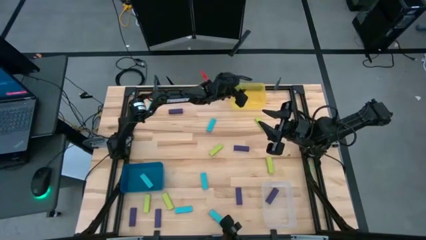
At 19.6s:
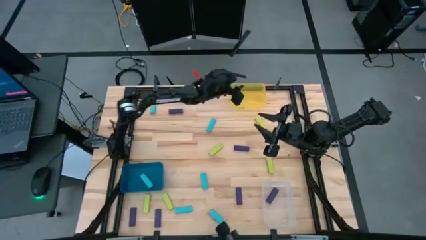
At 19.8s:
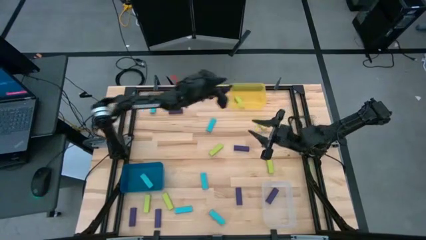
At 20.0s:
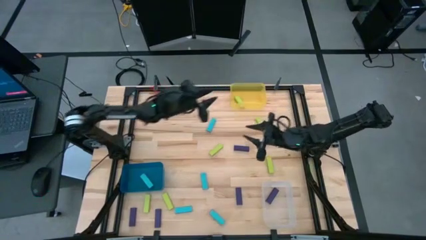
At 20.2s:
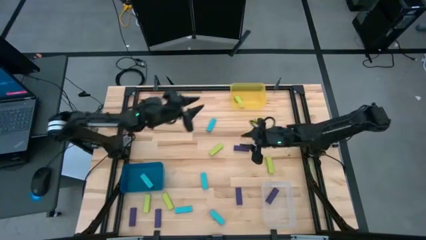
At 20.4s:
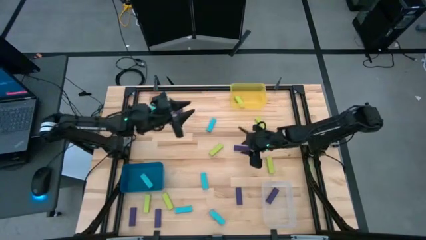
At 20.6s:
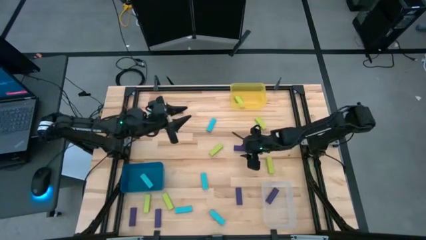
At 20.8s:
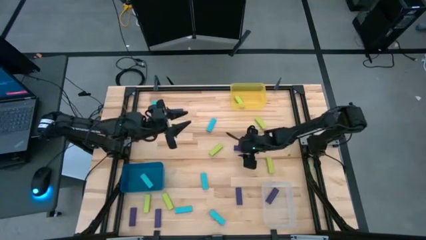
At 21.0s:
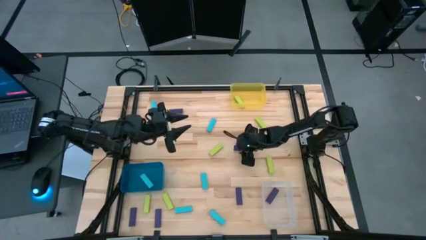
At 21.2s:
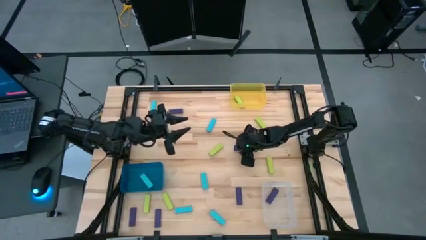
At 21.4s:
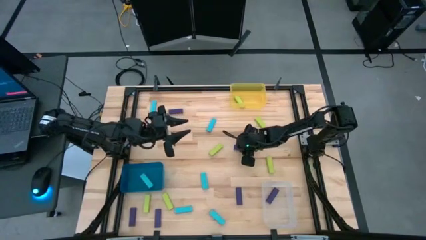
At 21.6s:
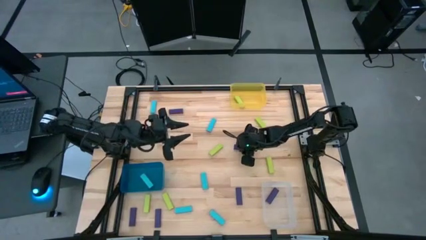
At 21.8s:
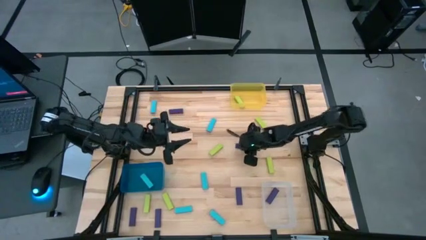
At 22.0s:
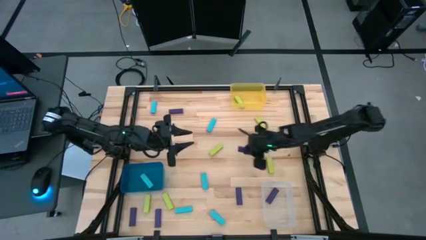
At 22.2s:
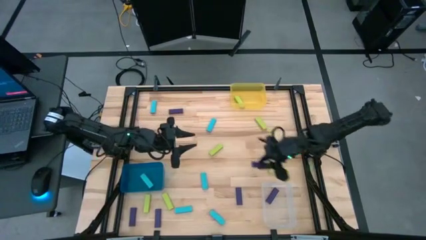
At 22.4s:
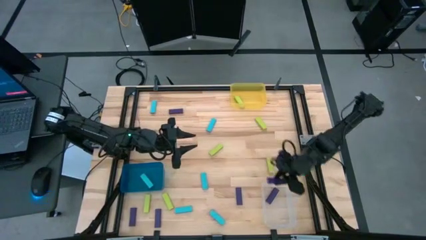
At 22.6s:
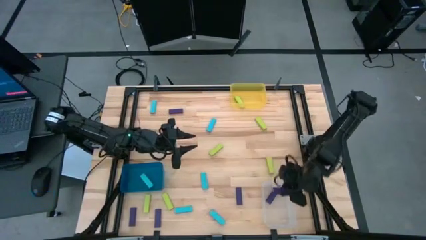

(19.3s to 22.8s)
Task: Sort blocks
Put the purple block into the transparent bin

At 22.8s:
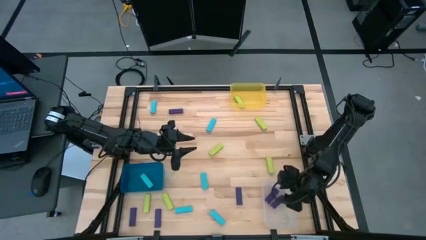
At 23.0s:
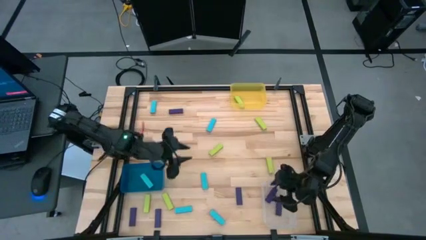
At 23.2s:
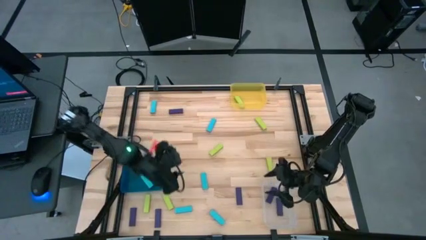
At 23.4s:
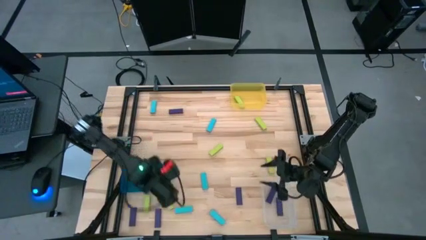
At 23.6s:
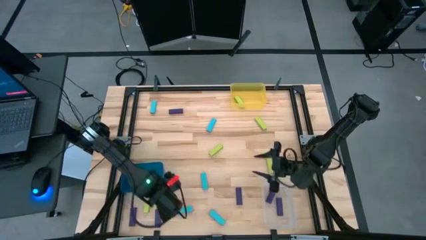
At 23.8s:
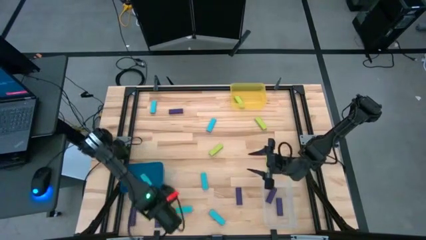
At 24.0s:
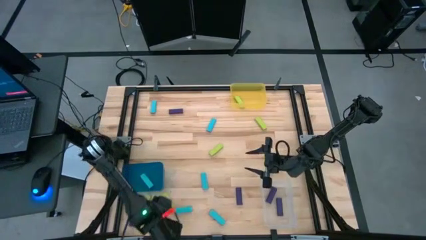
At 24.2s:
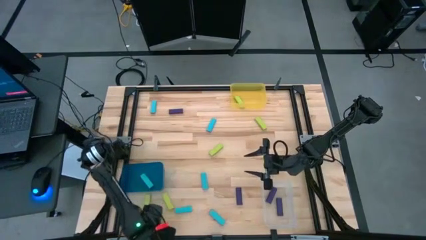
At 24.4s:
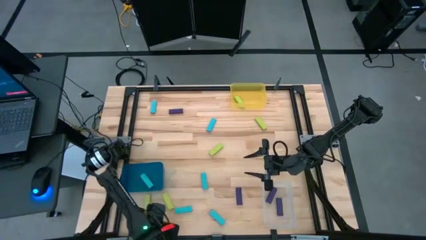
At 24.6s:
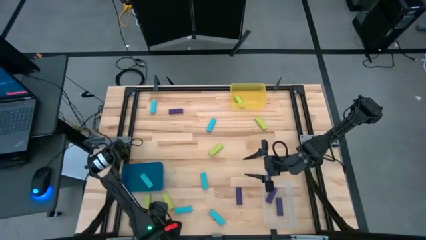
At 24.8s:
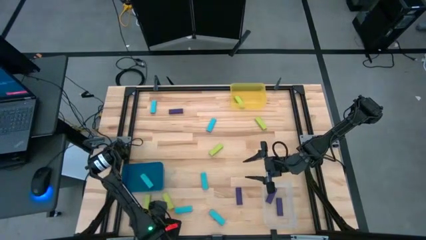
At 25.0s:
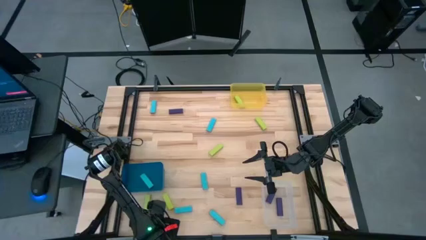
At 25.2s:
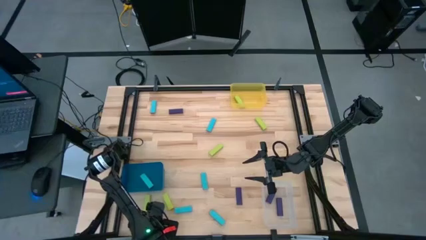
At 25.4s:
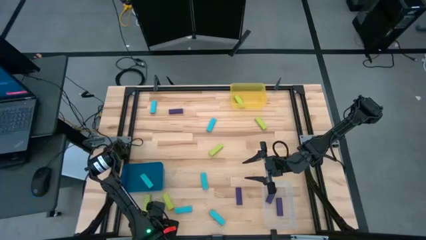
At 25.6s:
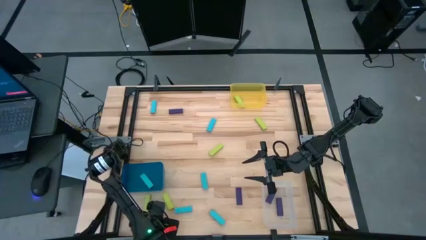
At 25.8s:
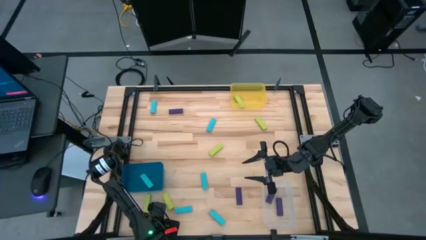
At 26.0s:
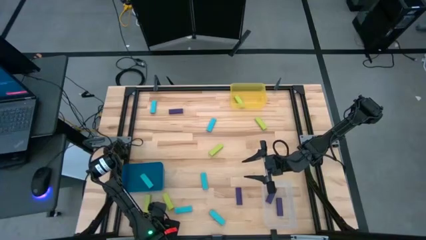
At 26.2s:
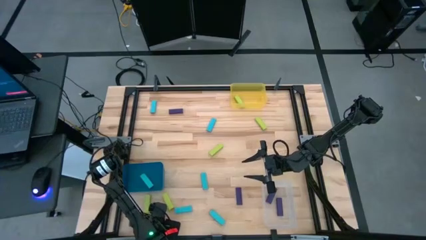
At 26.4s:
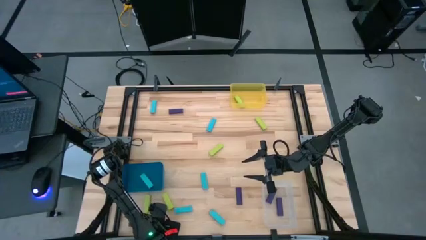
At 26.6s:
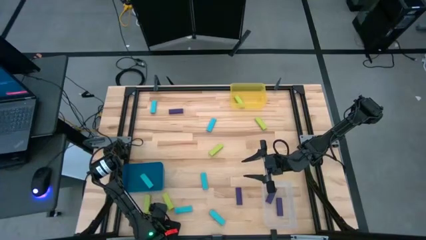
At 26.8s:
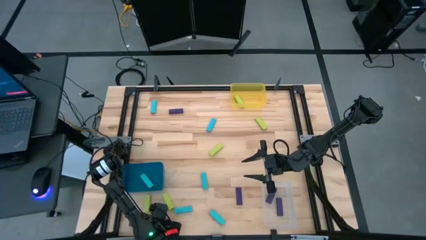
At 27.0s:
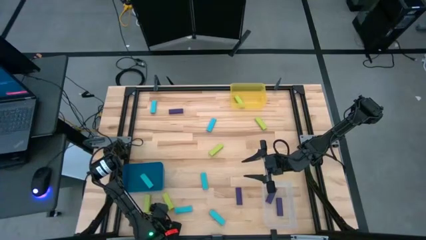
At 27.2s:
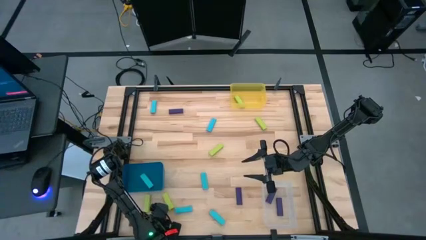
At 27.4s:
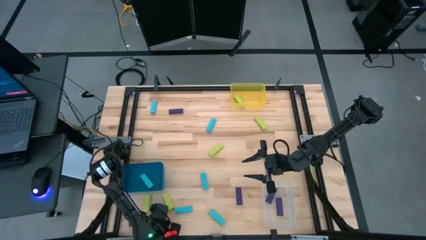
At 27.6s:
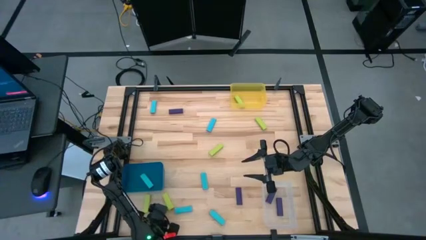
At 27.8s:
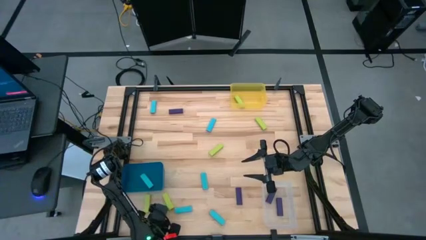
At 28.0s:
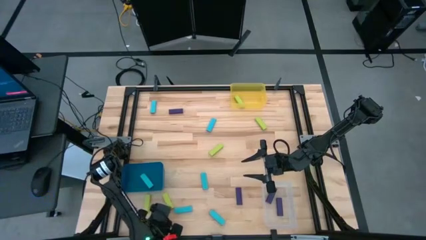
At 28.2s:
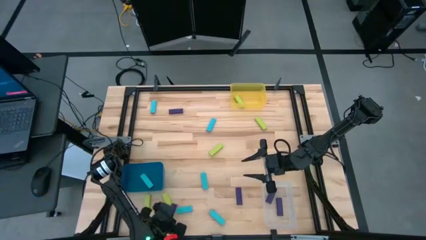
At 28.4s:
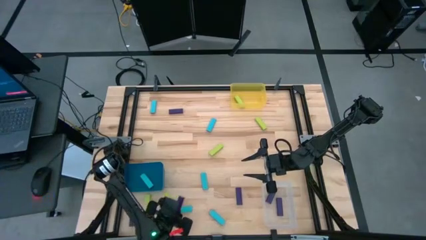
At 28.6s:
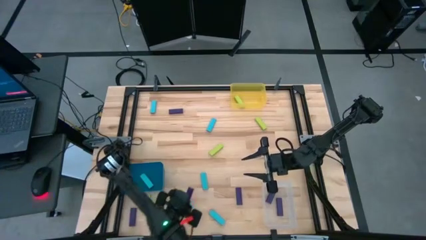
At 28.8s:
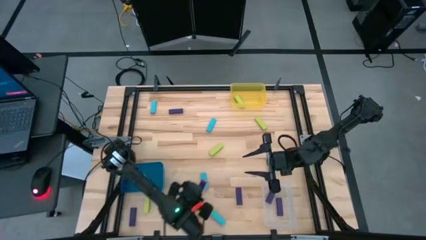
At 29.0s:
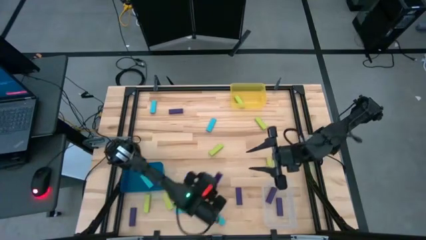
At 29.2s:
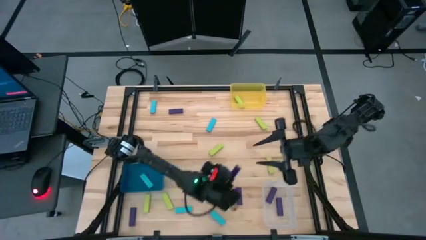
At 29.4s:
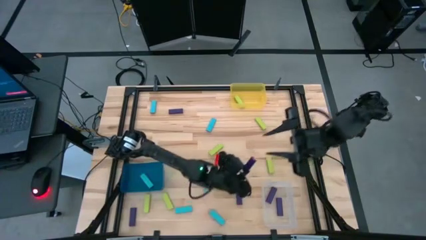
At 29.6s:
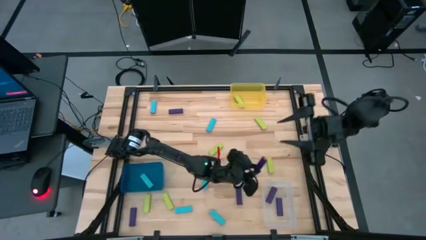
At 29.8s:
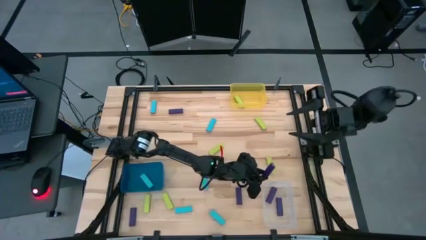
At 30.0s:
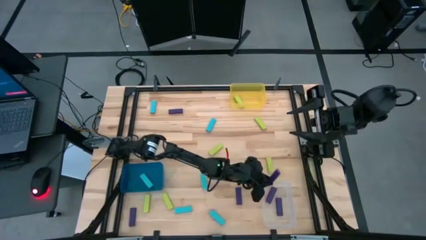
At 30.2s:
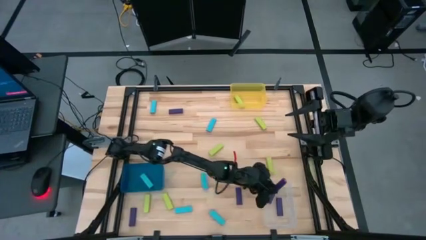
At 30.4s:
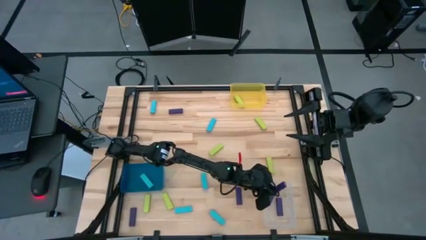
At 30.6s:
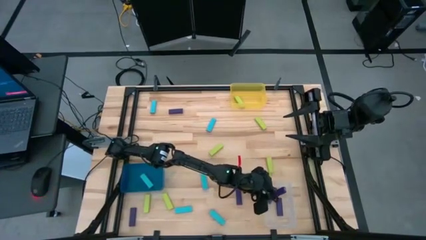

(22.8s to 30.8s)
Put the purple block into the transparent bin

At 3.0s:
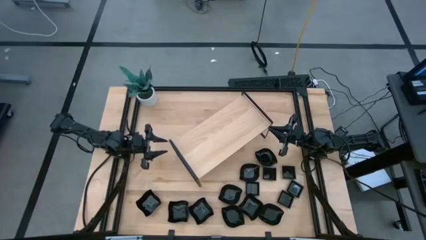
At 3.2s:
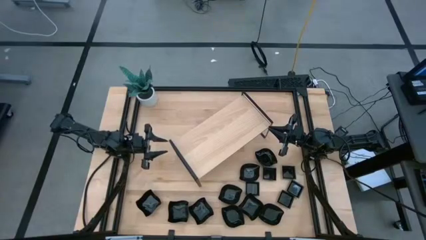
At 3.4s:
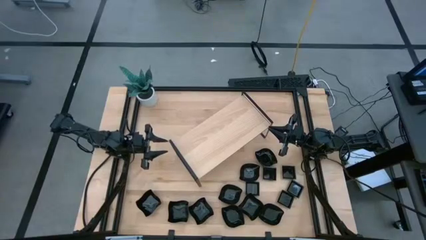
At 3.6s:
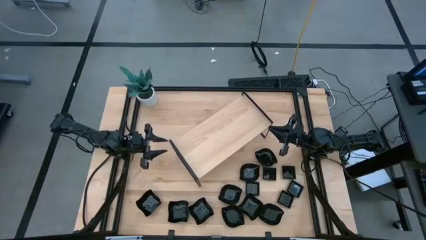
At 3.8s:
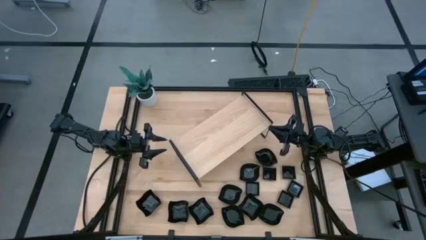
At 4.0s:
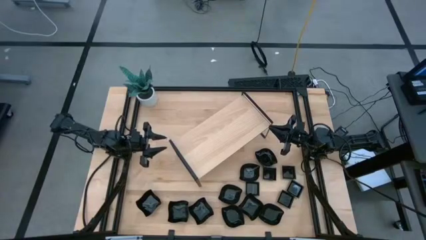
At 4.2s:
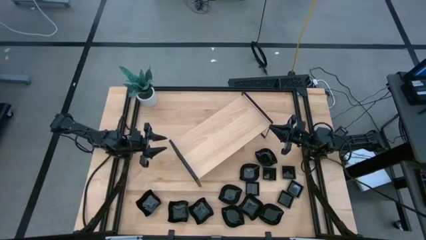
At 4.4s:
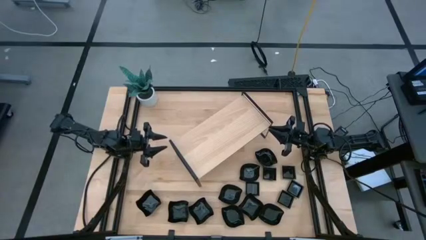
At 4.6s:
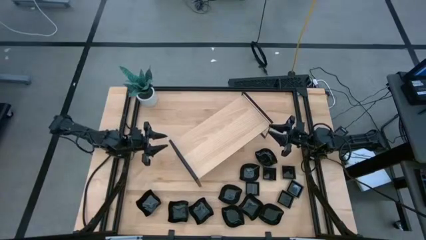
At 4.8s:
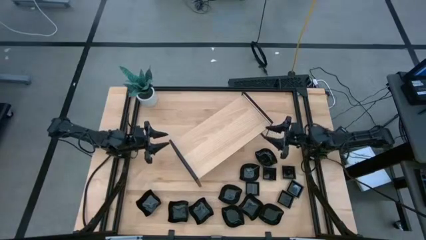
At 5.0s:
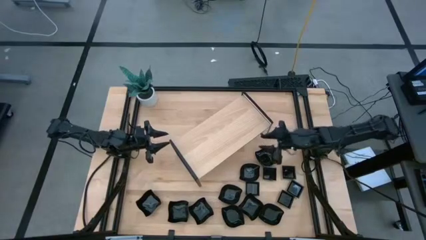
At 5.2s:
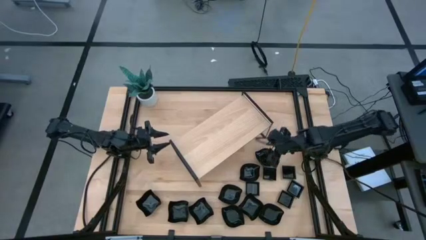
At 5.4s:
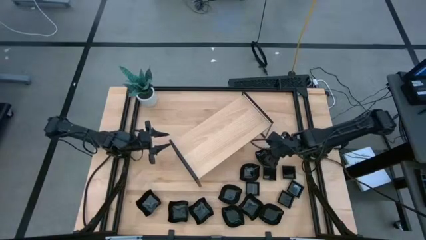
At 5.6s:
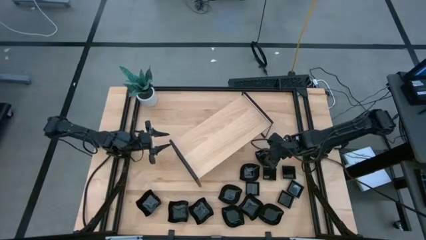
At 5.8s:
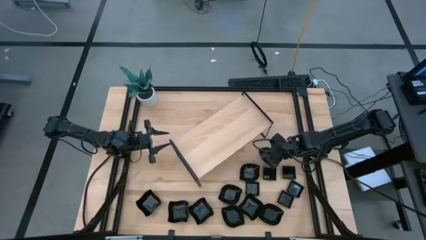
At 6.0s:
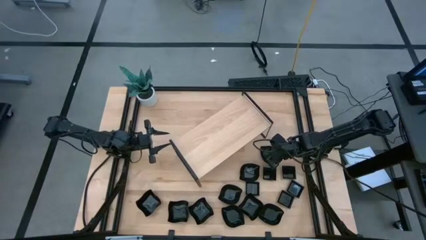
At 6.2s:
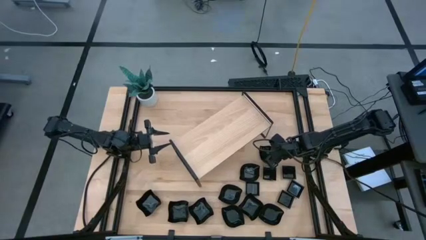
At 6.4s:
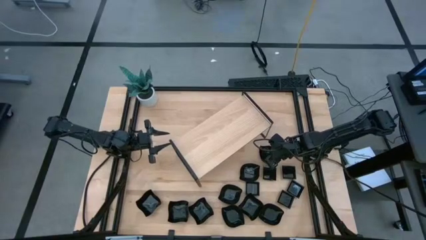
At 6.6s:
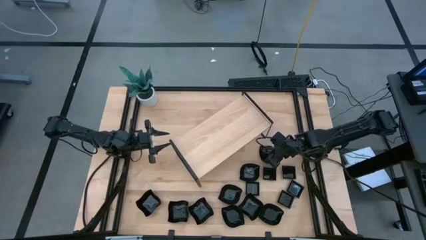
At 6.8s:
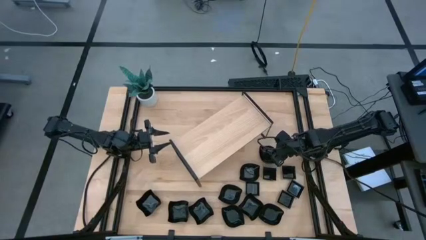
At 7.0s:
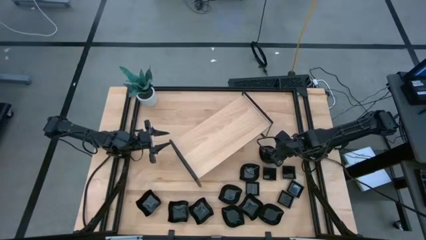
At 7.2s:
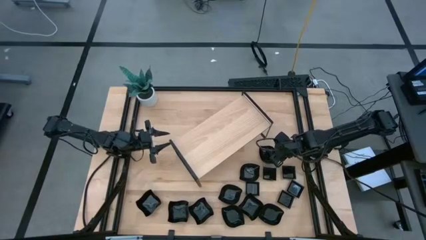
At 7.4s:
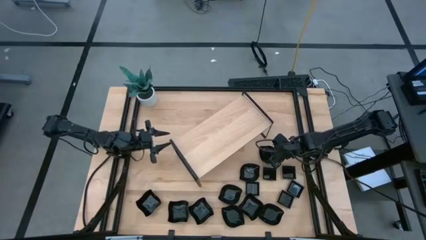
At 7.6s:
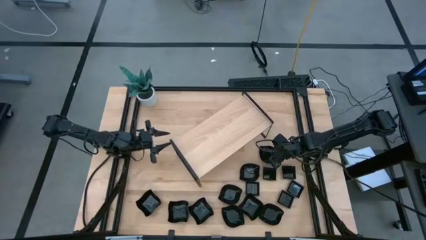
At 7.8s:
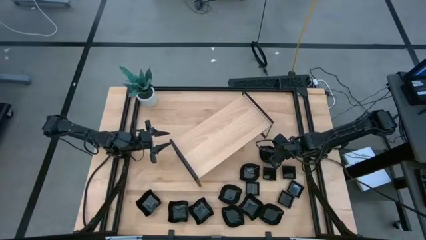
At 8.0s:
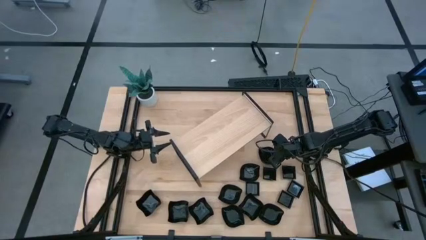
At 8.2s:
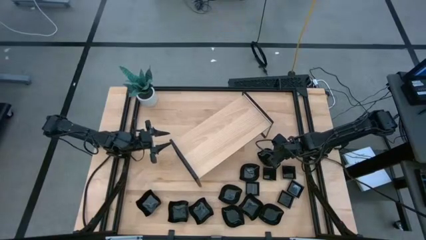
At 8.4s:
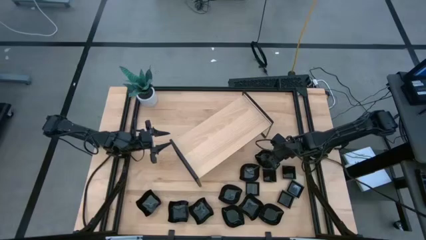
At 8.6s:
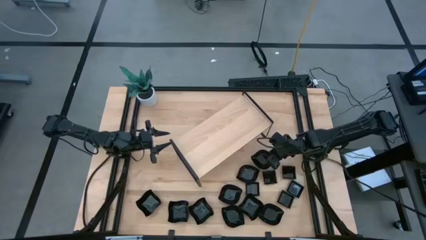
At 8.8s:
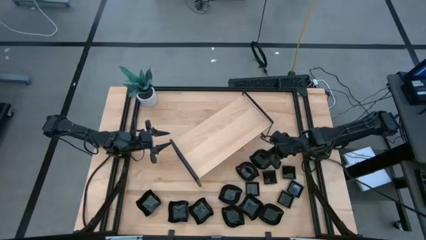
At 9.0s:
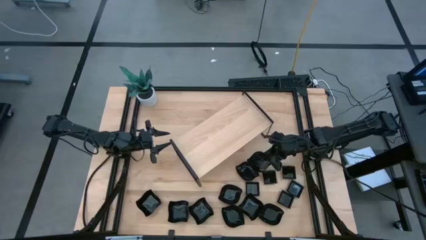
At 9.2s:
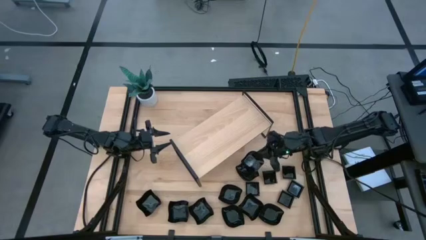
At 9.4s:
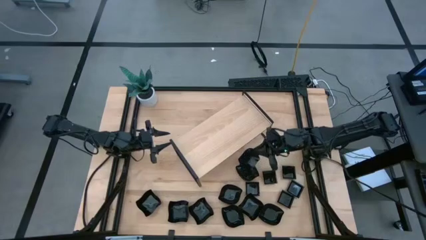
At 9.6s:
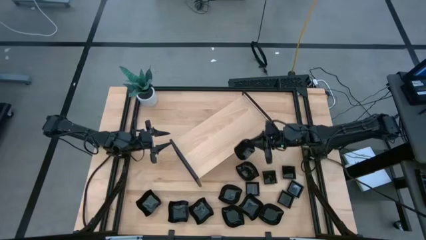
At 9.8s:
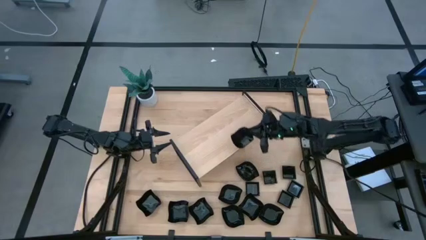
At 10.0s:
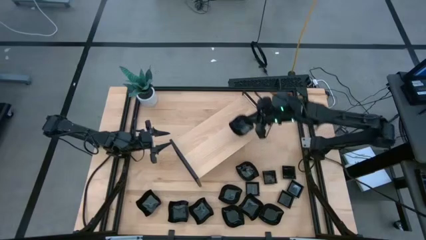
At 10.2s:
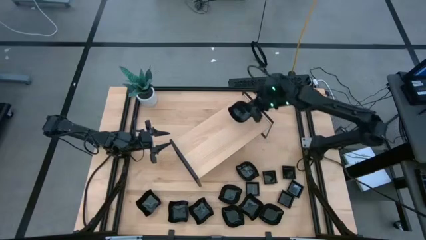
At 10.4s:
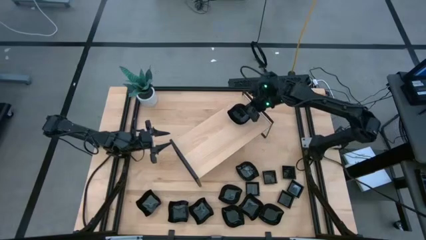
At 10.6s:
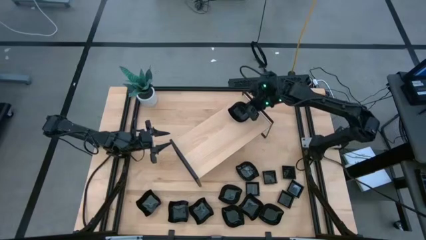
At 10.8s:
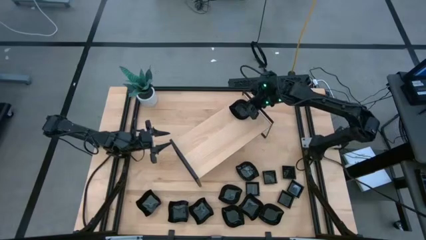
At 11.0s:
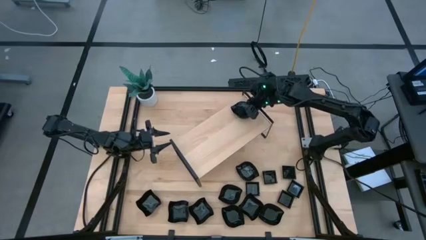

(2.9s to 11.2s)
Task: Pick & Place Mini shaped plates
Put the leaf shaped plate on the shelf
